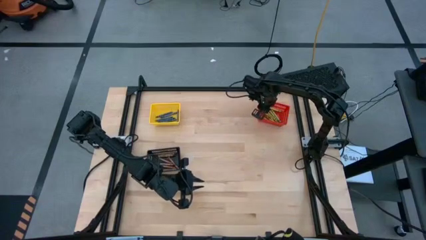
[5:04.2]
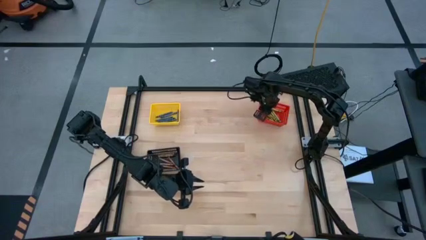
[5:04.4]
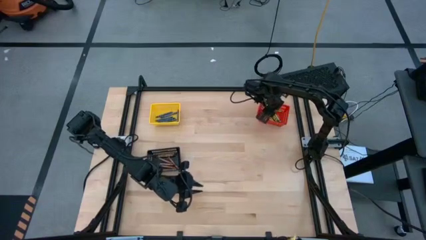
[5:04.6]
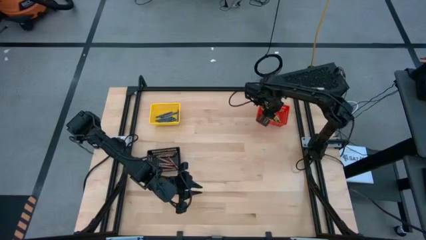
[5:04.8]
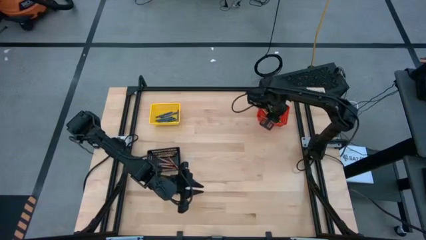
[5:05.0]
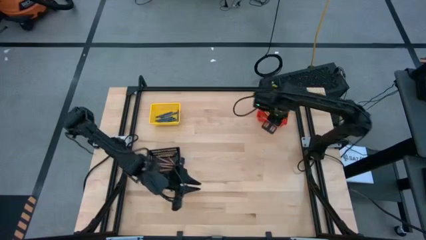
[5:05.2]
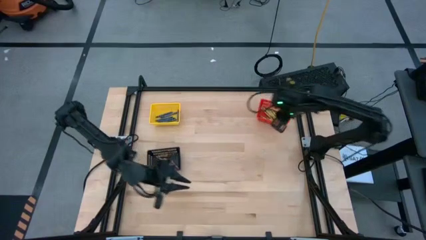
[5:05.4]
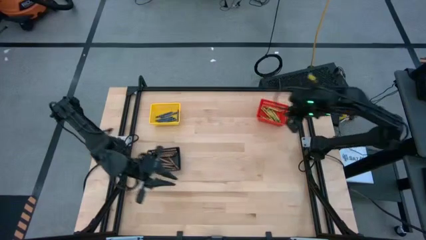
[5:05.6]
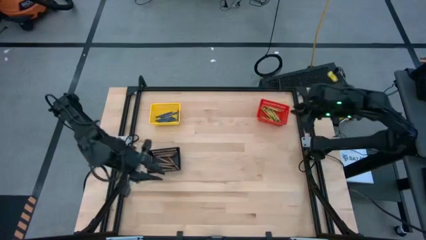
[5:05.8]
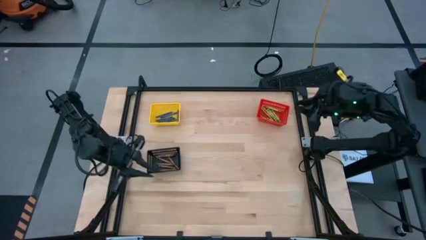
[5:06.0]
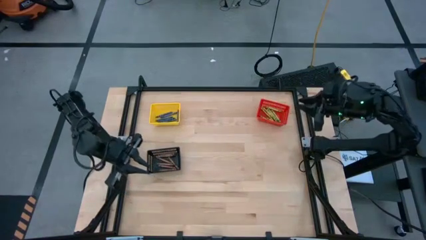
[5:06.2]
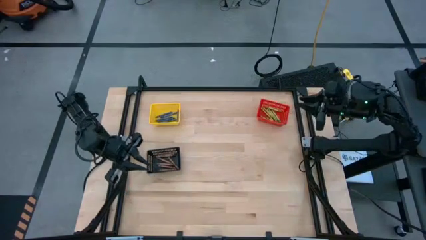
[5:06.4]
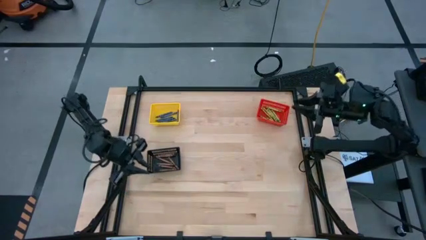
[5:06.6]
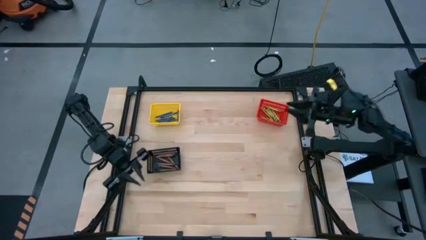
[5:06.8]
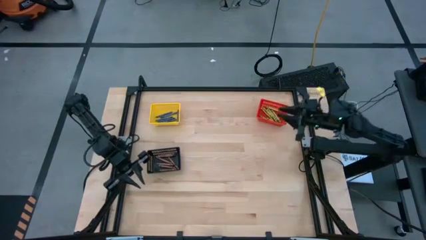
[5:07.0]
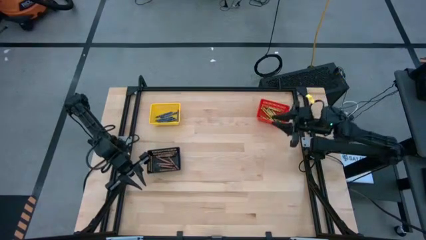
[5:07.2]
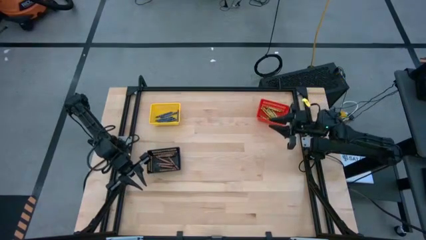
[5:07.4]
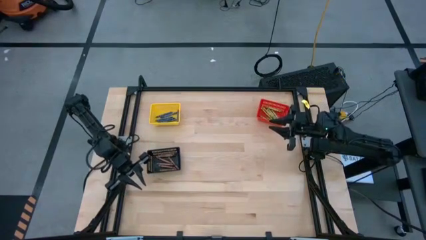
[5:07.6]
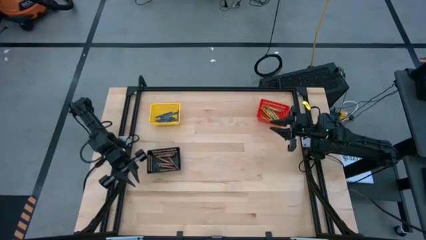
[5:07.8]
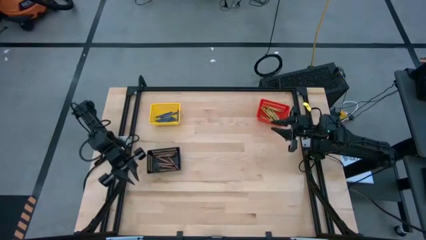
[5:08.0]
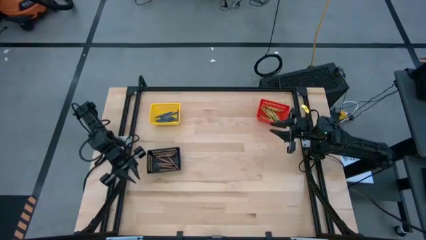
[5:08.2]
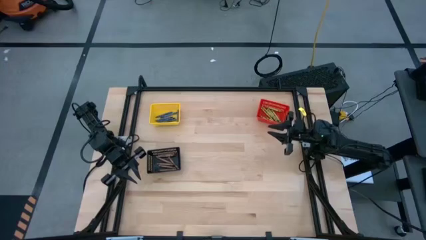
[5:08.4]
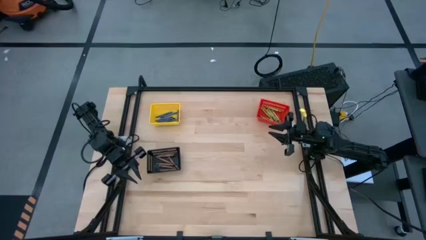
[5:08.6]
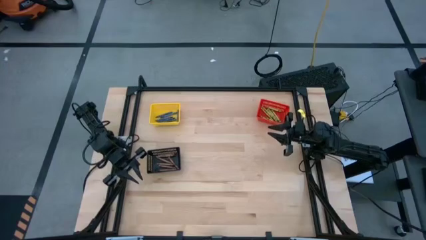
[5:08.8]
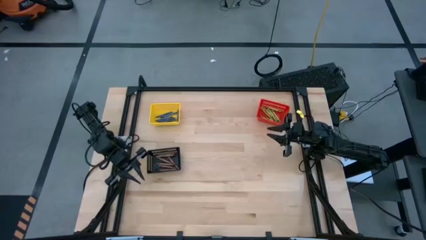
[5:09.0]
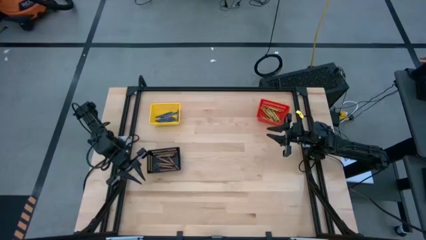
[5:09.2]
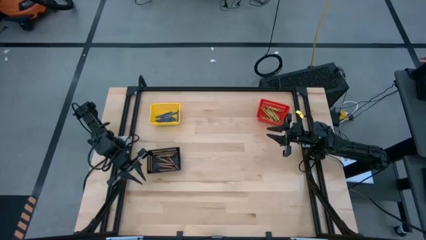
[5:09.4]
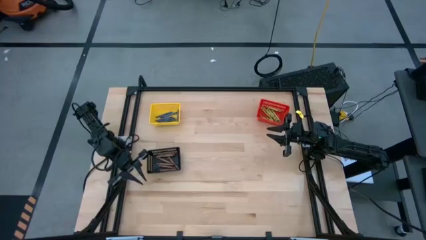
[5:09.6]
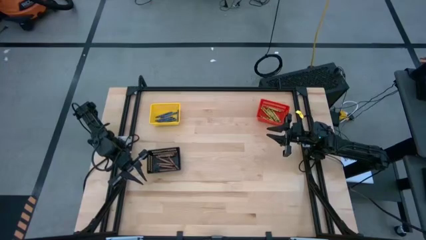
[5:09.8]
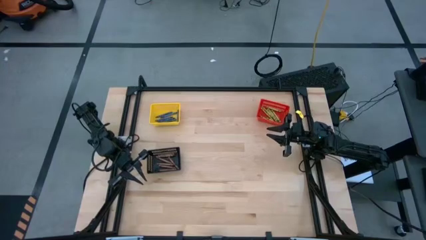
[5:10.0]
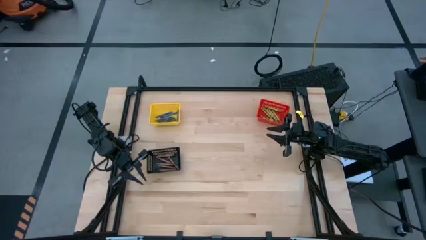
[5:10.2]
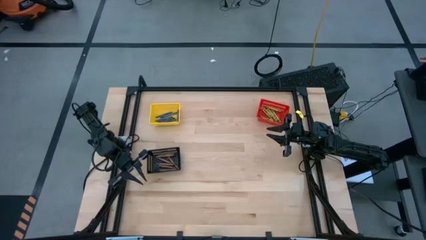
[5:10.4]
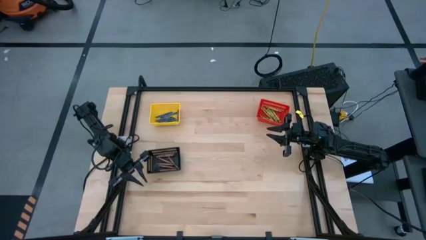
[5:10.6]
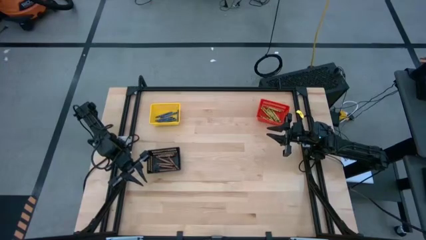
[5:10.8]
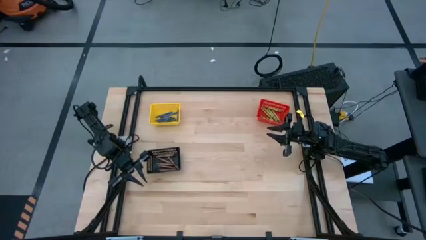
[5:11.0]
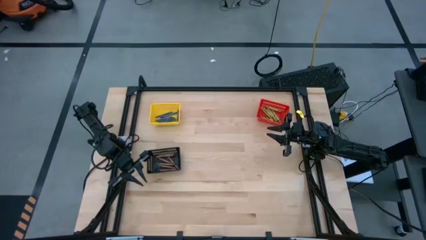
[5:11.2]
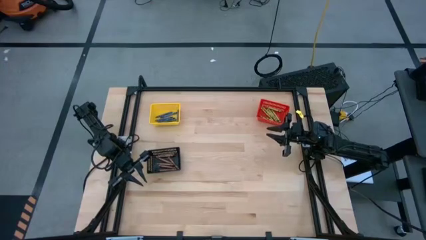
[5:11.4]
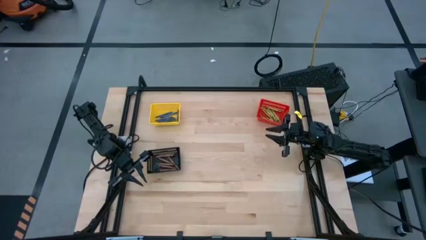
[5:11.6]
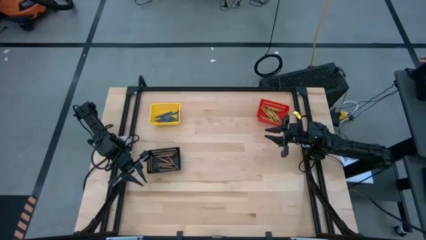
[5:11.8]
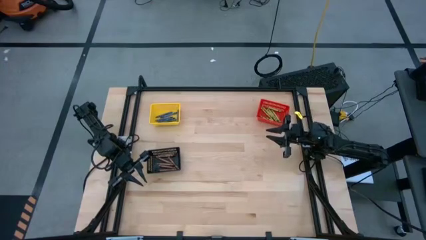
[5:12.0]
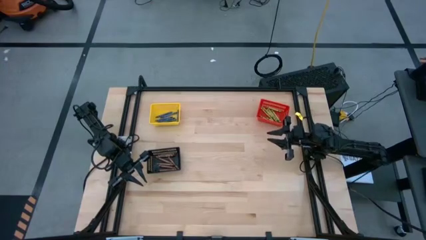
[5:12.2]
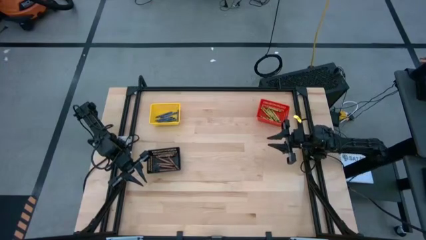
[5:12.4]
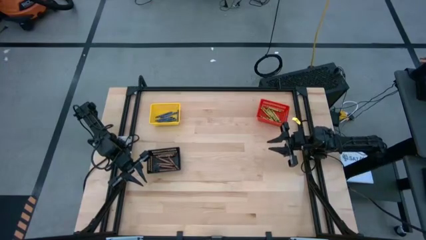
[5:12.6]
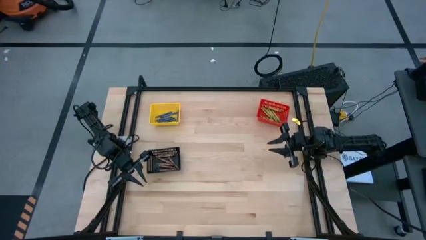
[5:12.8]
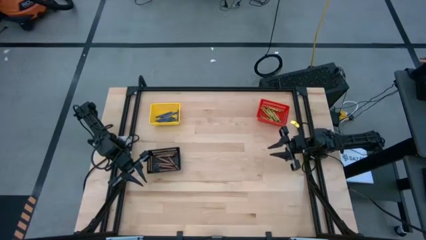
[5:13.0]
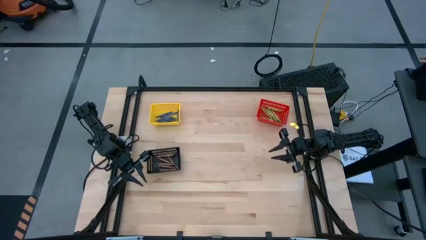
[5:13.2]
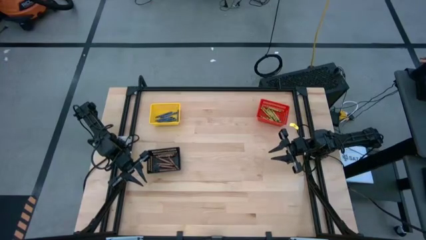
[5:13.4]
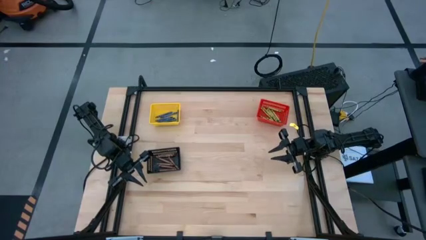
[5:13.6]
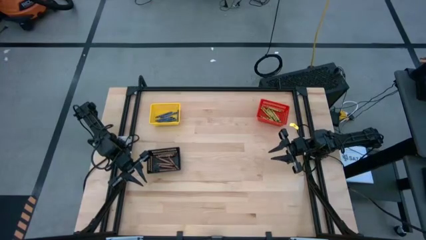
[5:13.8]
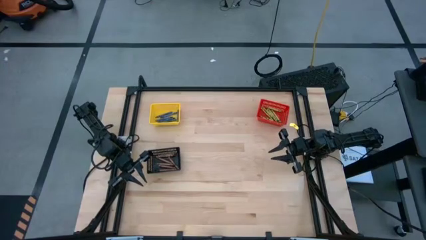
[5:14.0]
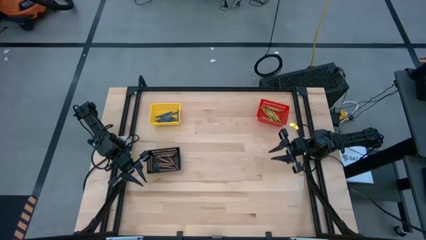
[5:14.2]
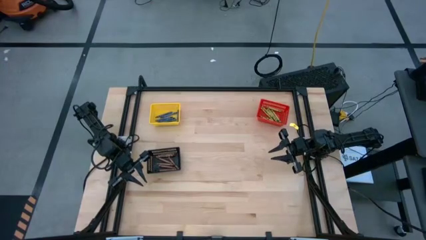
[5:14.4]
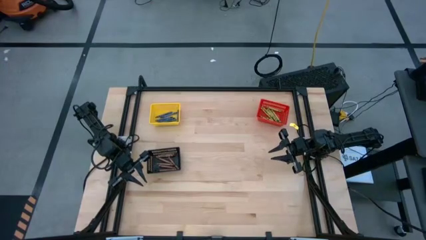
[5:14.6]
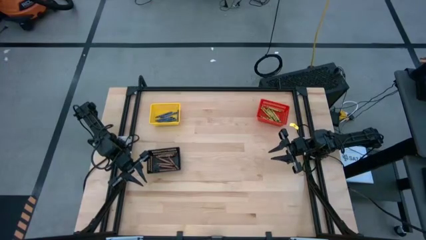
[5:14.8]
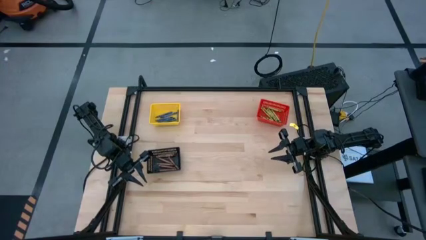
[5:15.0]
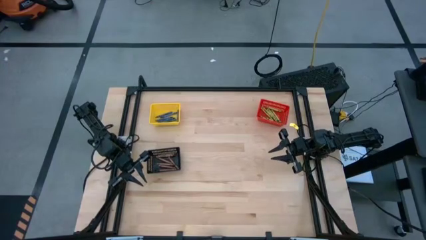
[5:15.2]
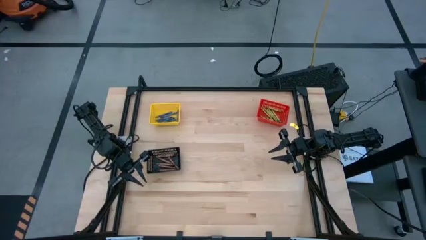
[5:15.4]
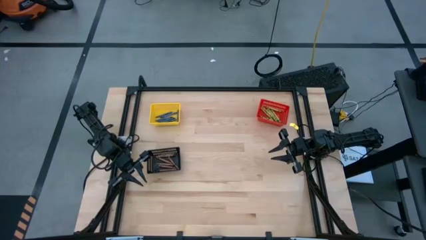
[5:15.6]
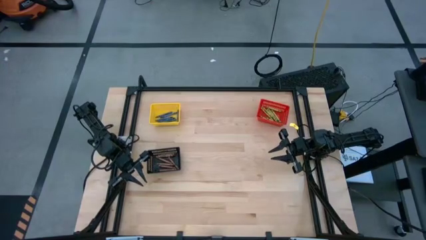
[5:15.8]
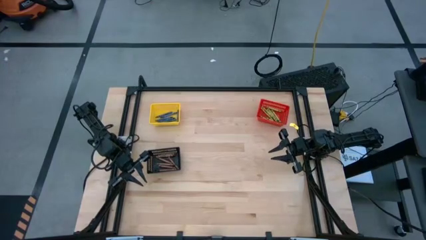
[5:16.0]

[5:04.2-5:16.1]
Task: Sort crayons
Return to Home Position
